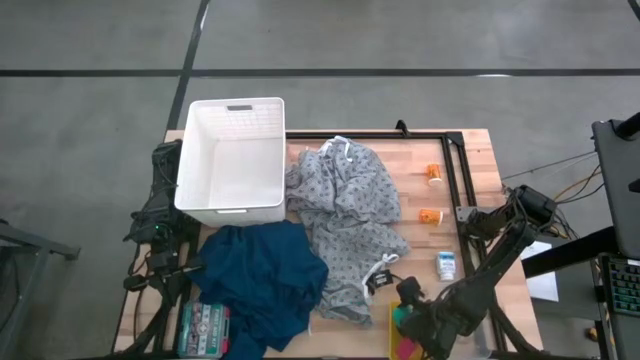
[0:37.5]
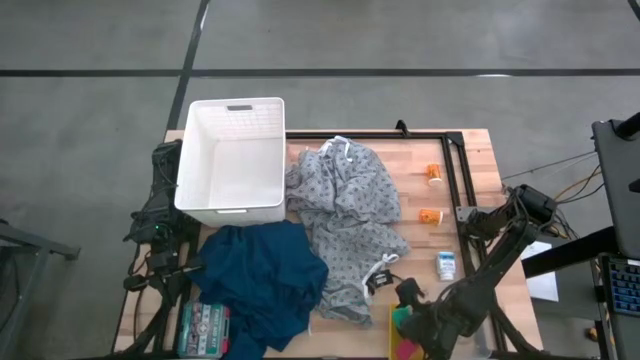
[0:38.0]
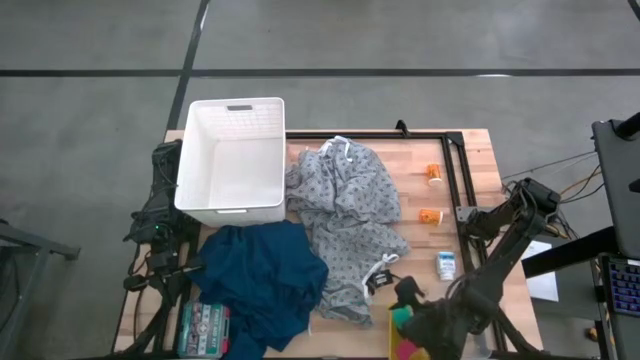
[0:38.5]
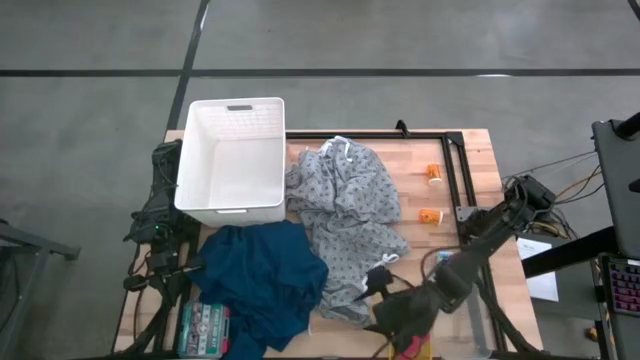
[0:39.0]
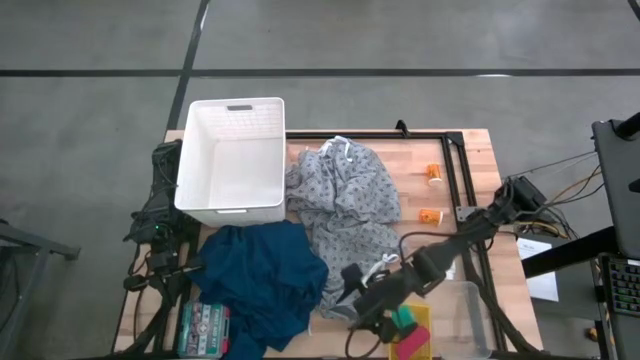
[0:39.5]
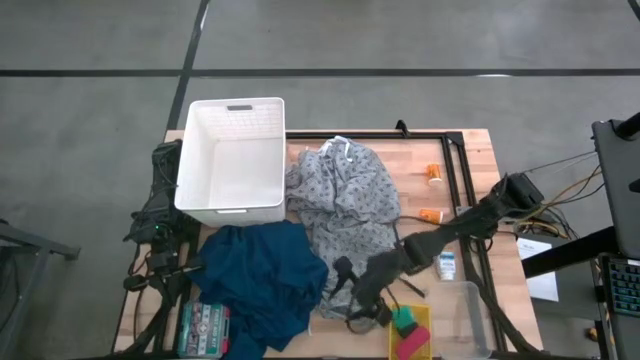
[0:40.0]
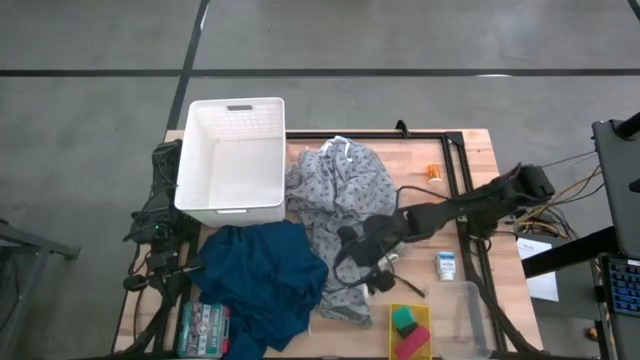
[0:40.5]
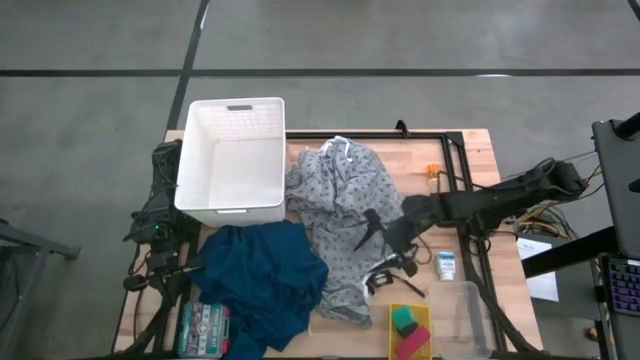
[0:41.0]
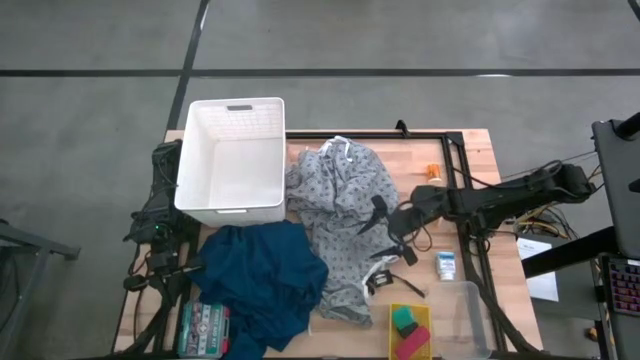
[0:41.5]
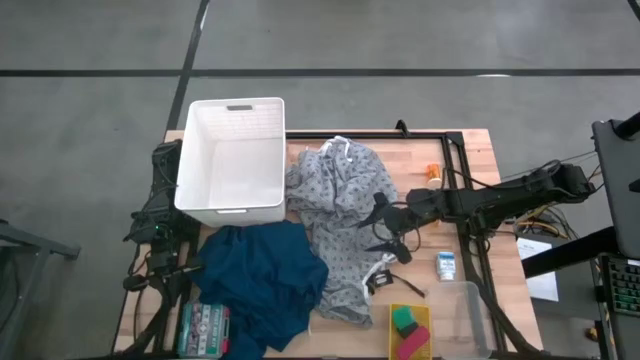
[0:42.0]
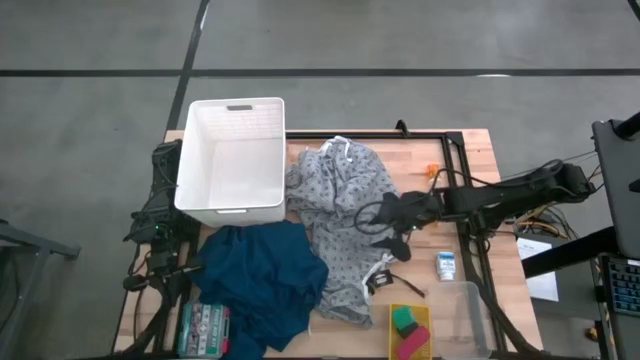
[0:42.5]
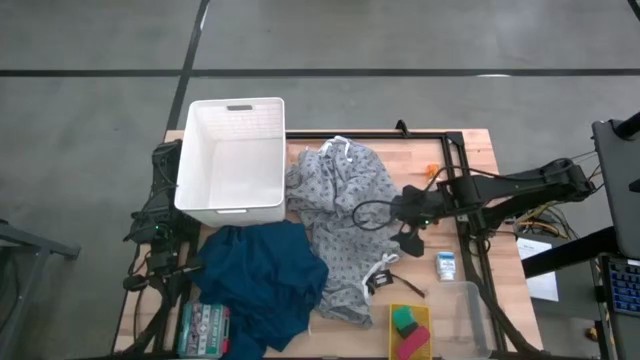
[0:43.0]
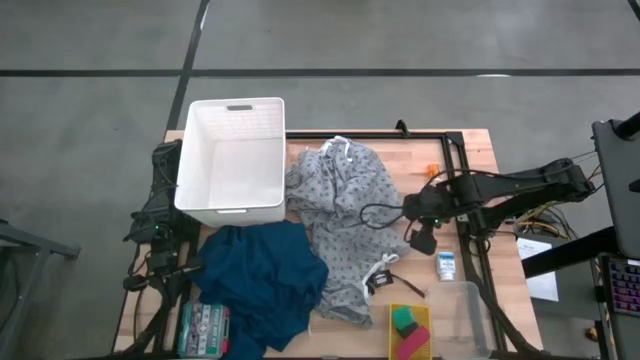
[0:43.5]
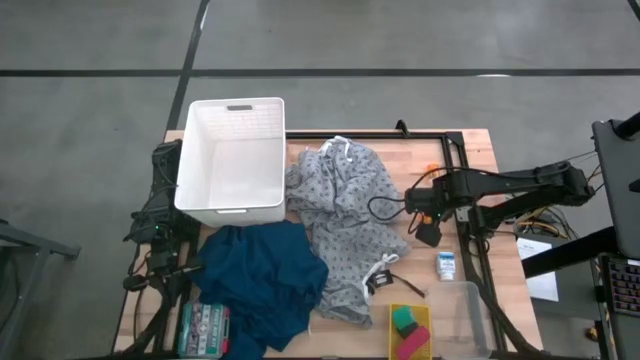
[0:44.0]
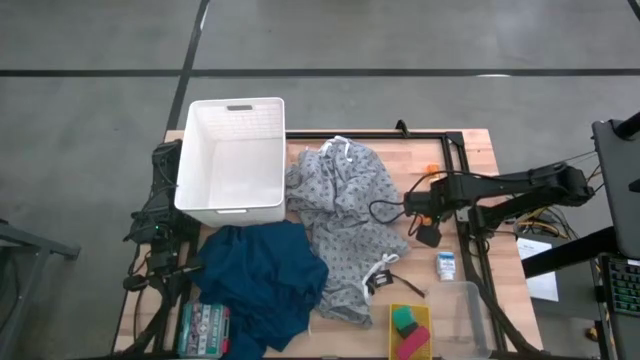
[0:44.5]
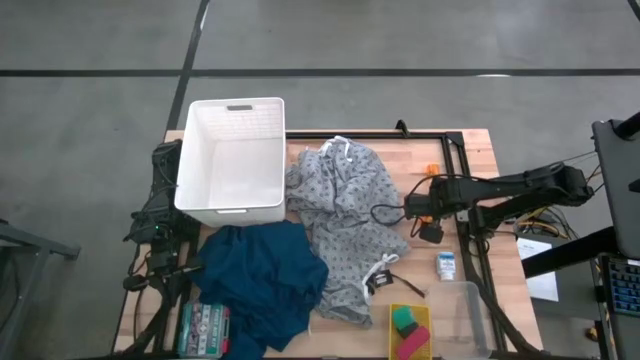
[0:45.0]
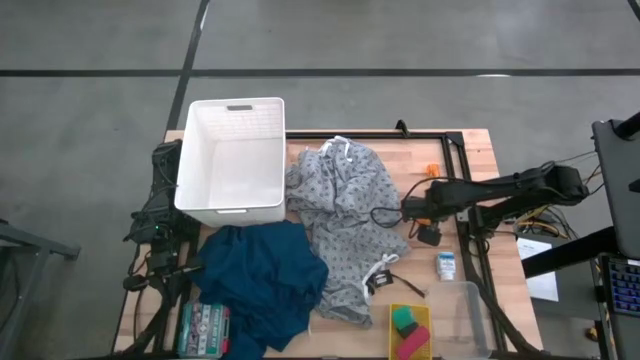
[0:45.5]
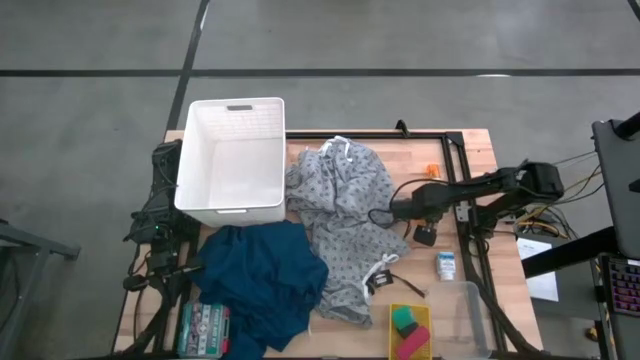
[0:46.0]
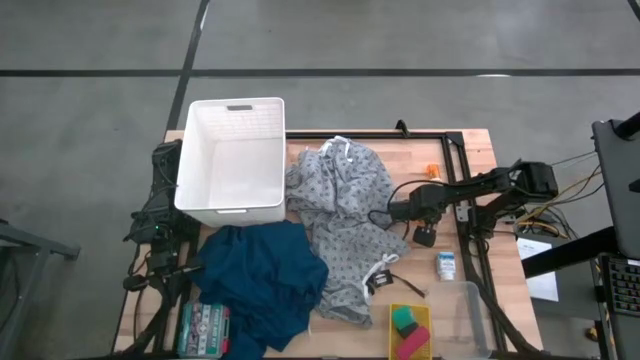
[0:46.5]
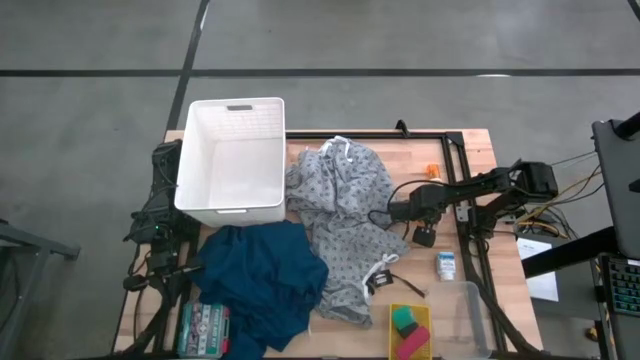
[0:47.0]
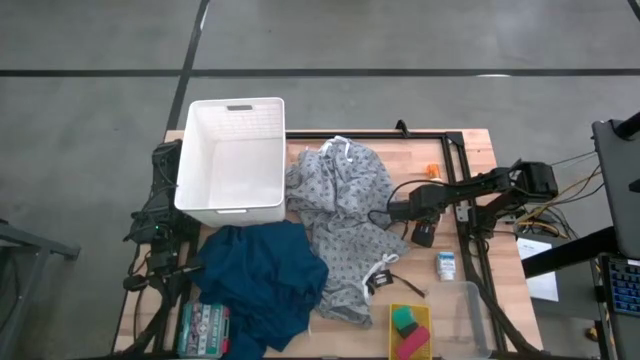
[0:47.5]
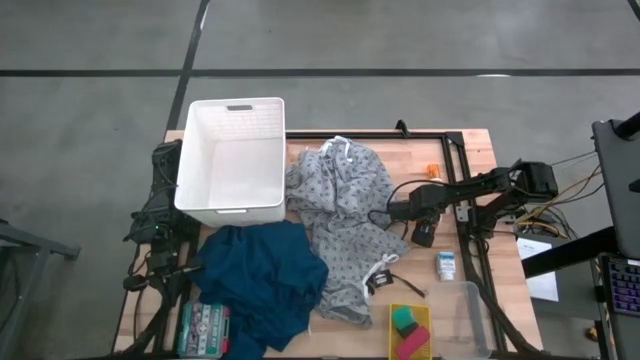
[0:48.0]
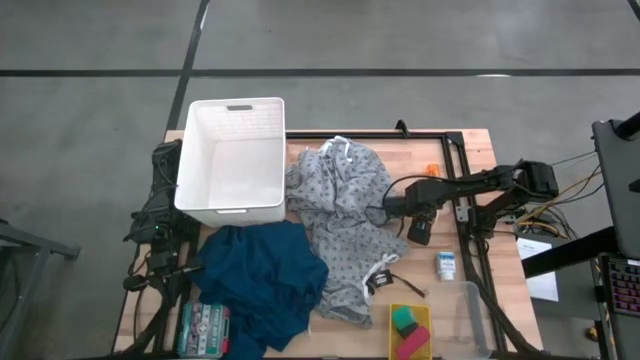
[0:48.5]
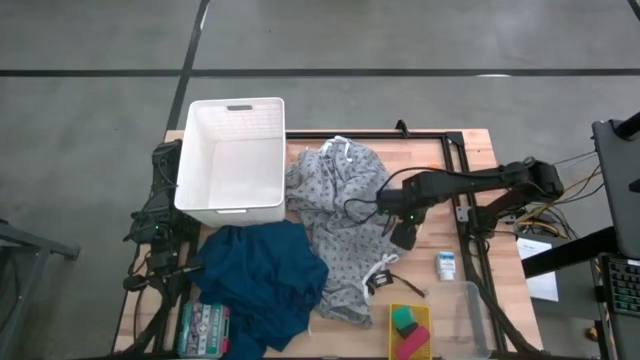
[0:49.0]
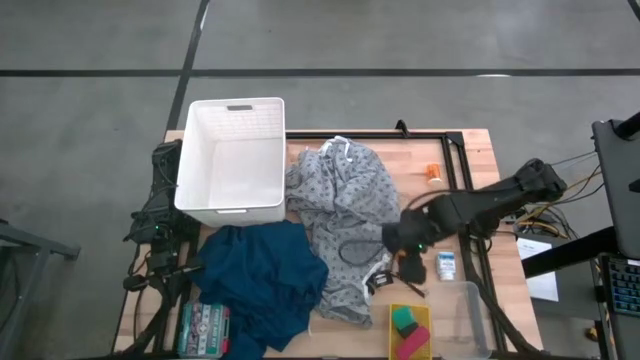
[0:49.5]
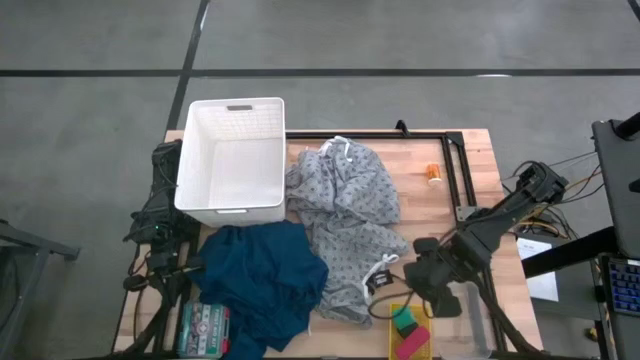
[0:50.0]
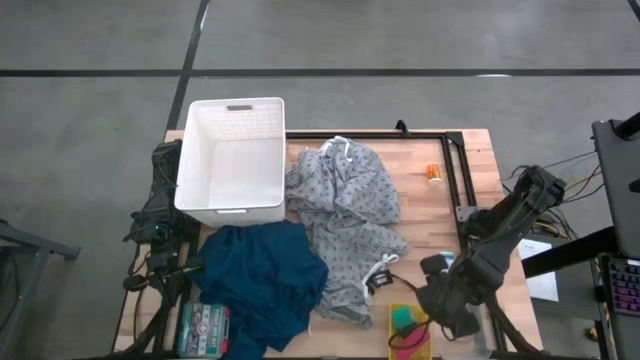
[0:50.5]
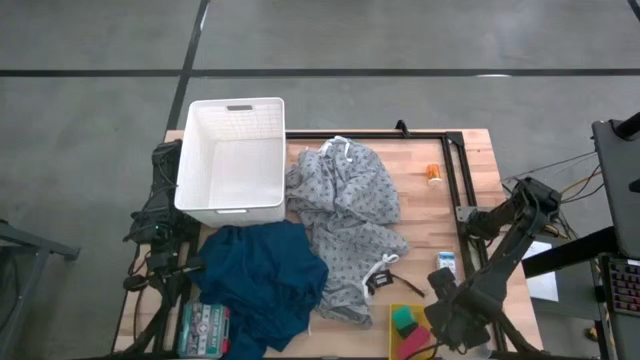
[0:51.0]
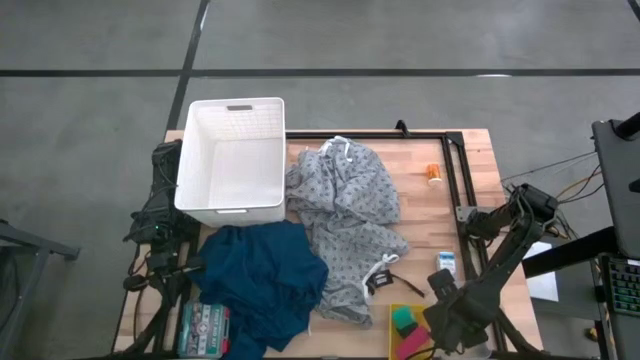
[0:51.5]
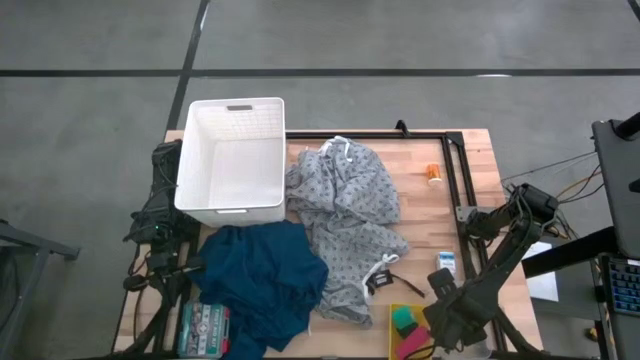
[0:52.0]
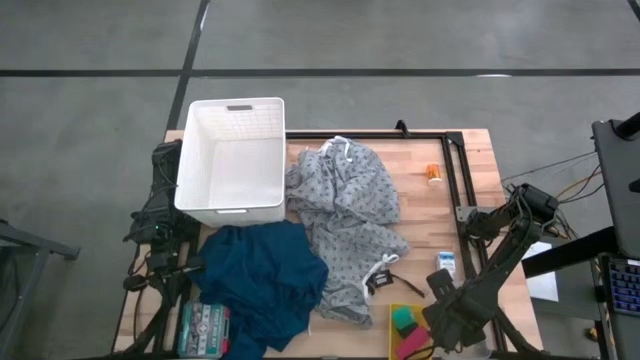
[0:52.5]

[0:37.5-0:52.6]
Task: Pick & Place Medicine items
Put the top orange pill bottle into the transparent bin

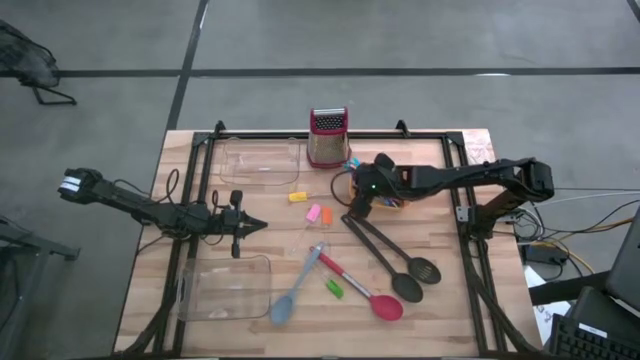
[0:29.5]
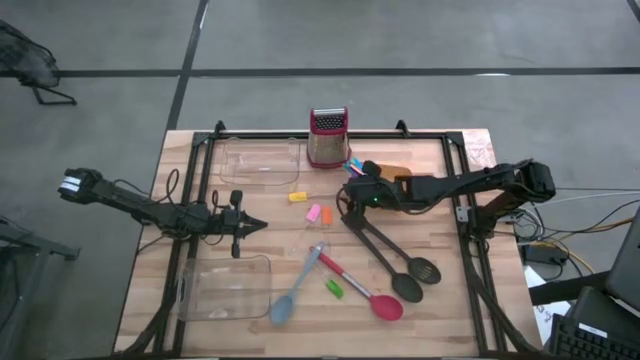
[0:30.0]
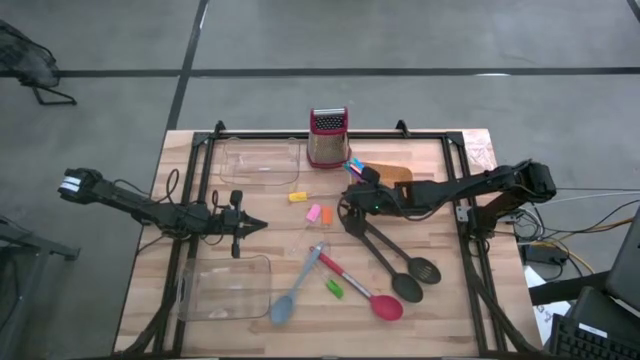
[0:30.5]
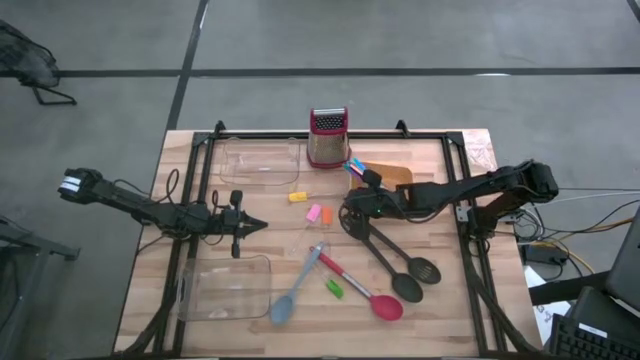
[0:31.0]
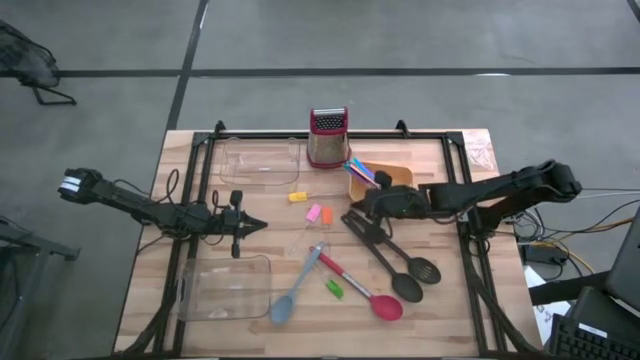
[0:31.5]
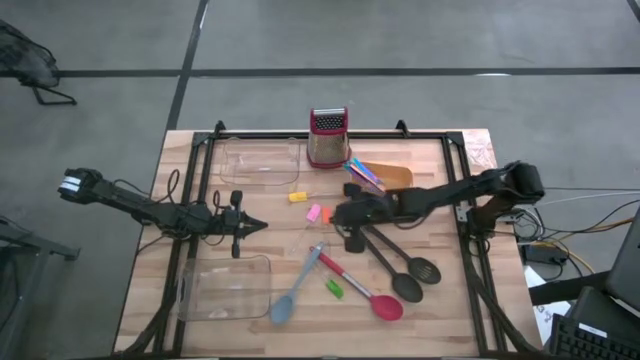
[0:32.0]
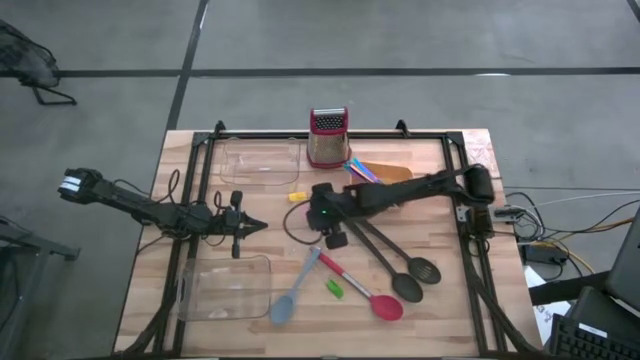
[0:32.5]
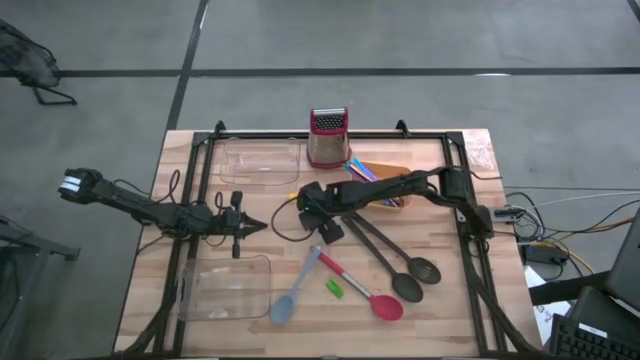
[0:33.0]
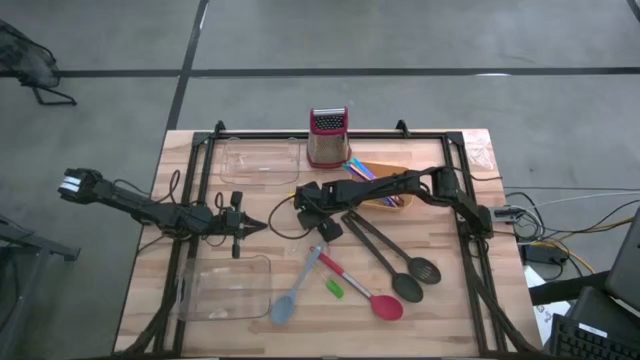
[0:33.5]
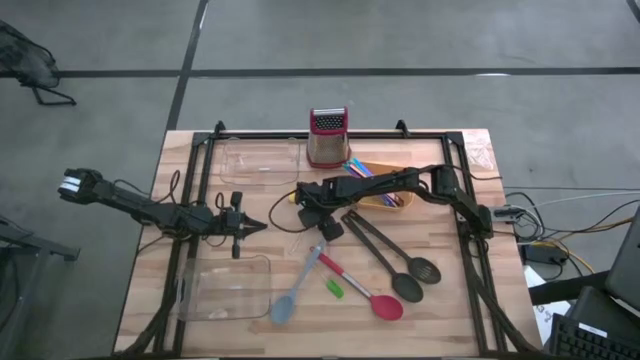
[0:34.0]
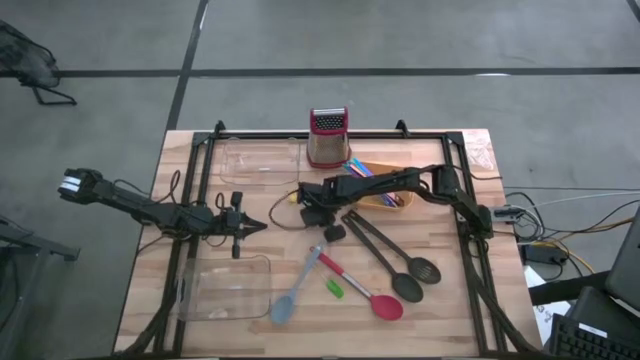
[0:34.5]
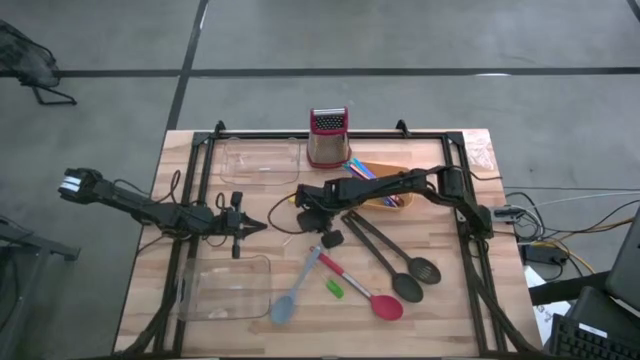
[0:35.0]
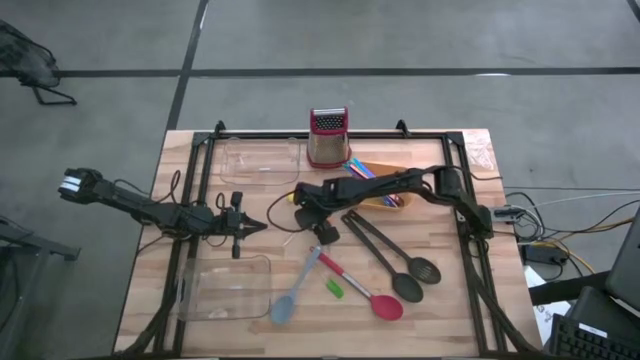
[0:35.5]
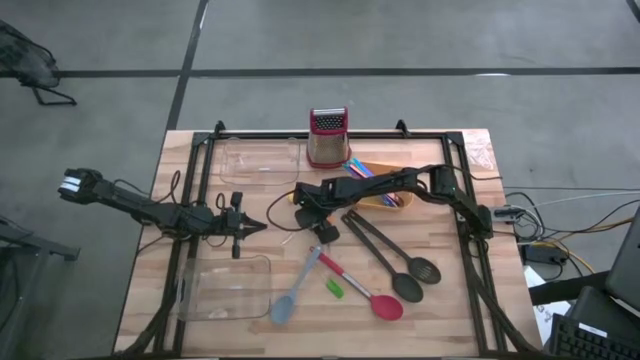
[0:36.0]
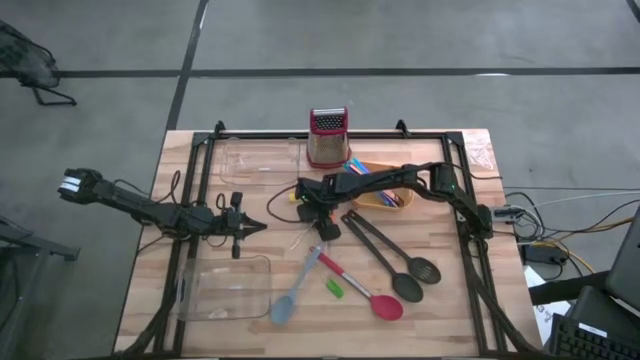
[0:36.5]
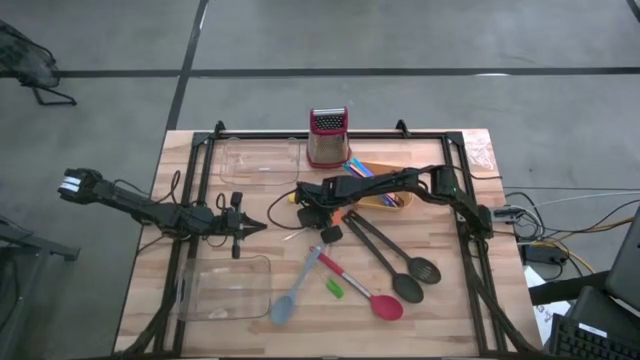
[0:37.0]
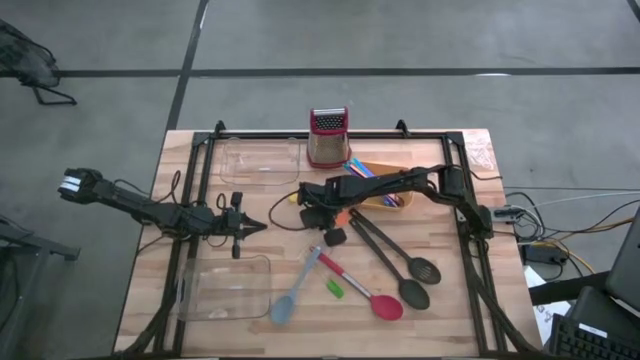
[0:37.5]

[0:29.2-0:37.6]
Task: Pick & Place Kitchen Items
Put the pink spatula into the top transparent bin
